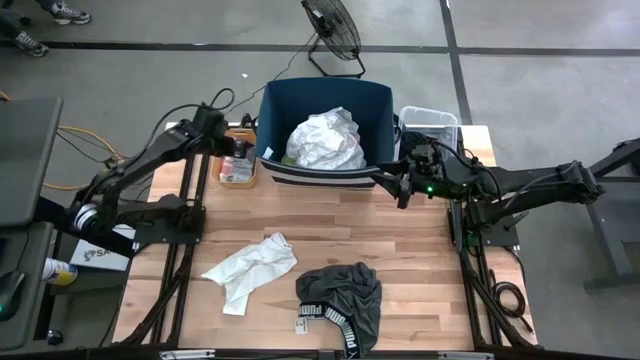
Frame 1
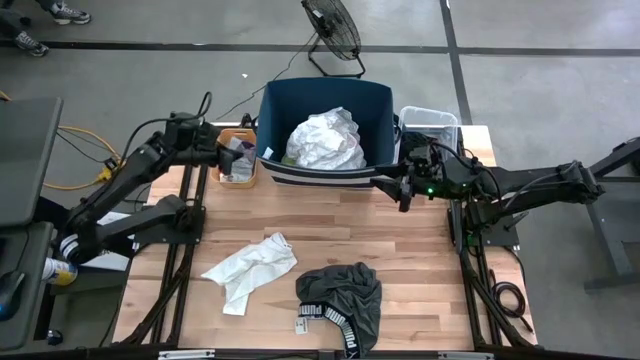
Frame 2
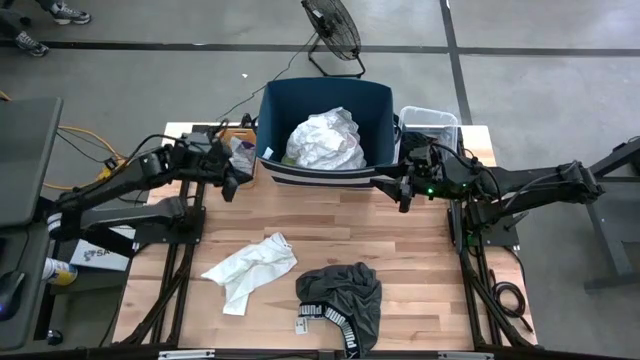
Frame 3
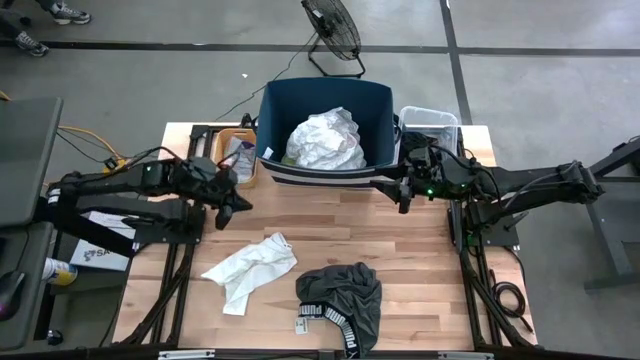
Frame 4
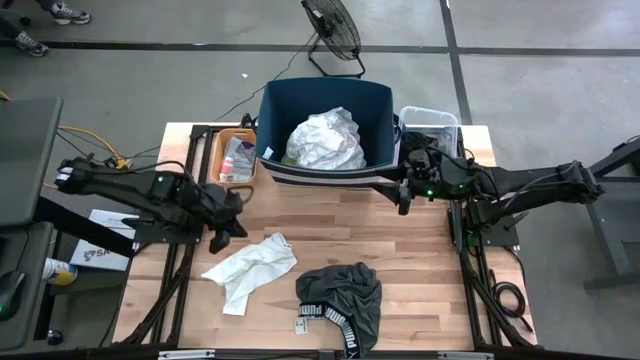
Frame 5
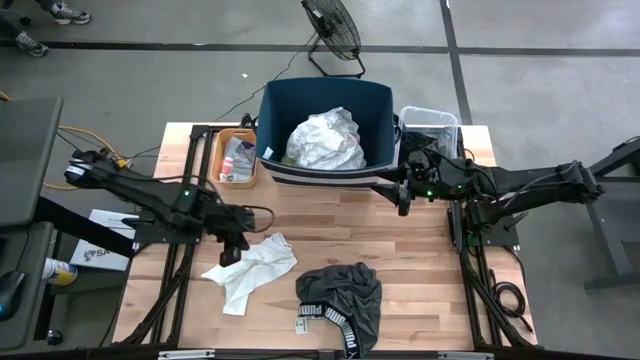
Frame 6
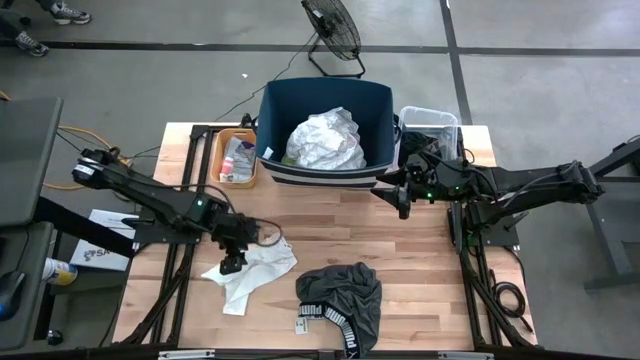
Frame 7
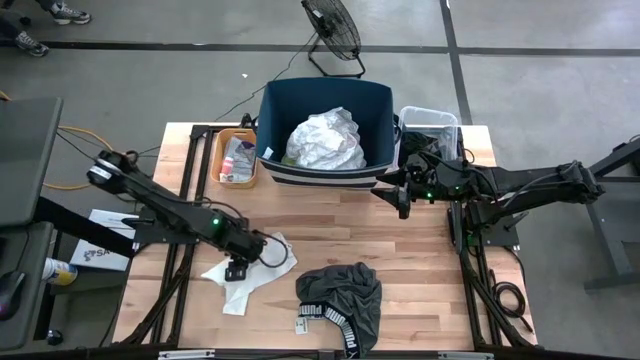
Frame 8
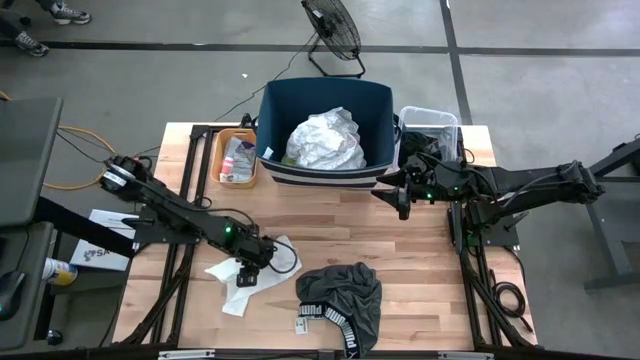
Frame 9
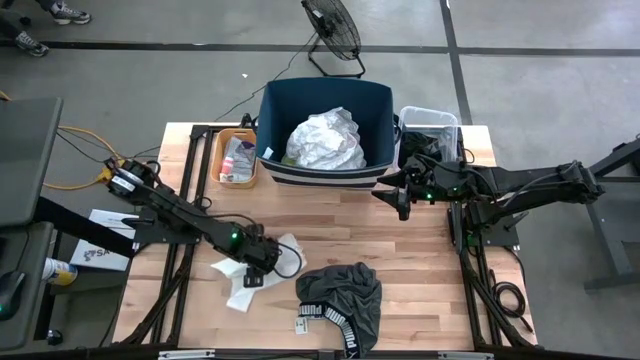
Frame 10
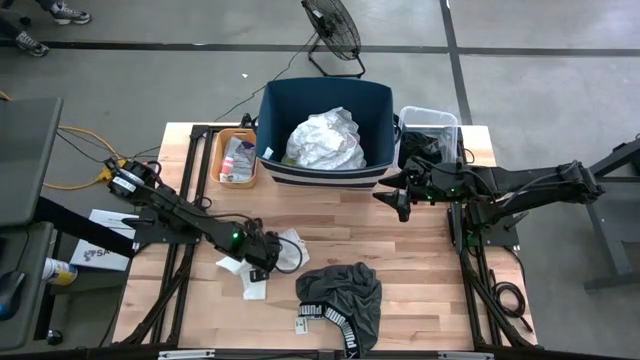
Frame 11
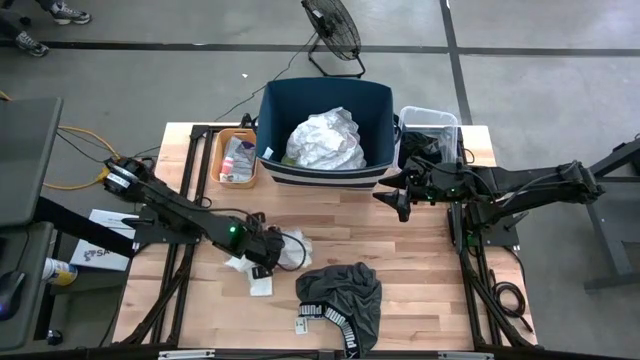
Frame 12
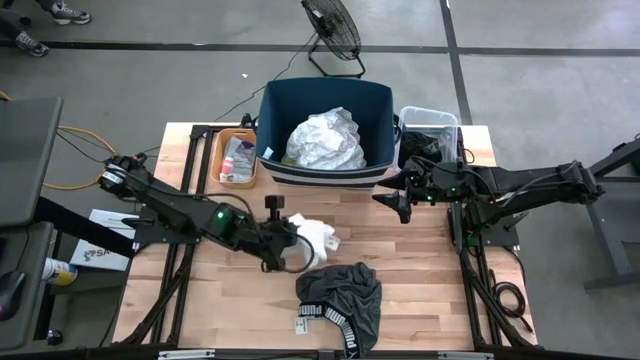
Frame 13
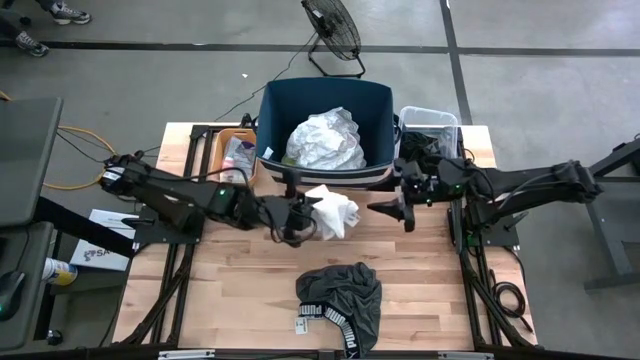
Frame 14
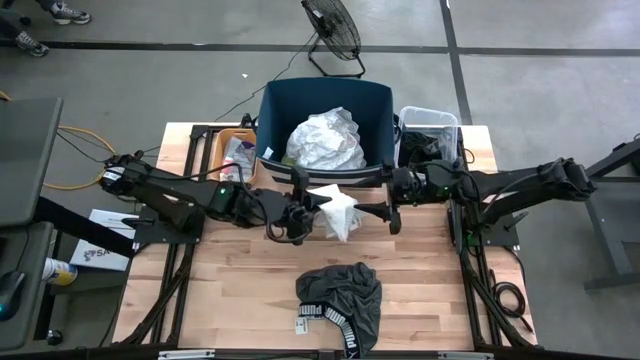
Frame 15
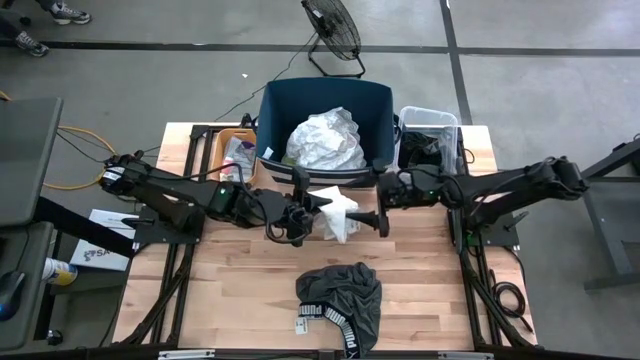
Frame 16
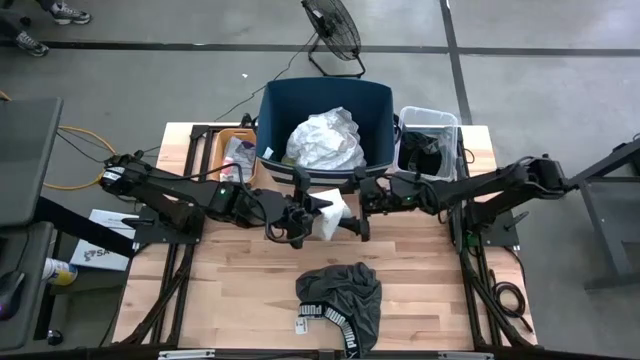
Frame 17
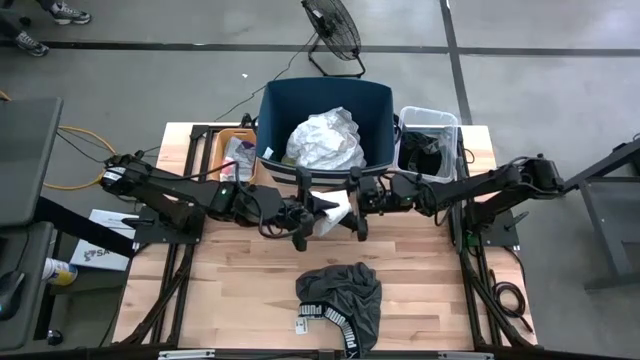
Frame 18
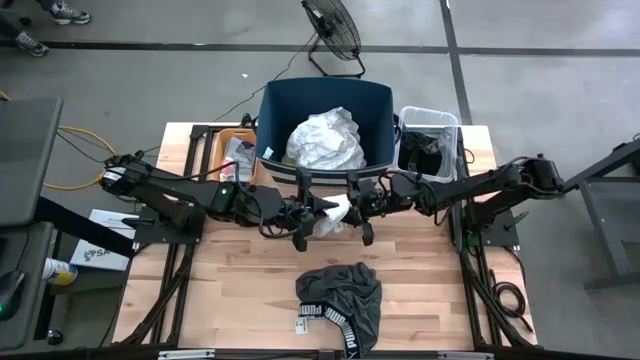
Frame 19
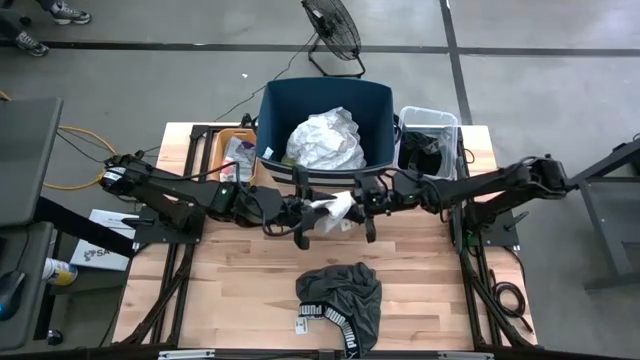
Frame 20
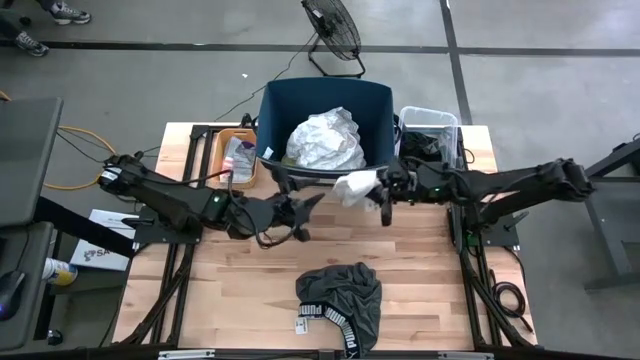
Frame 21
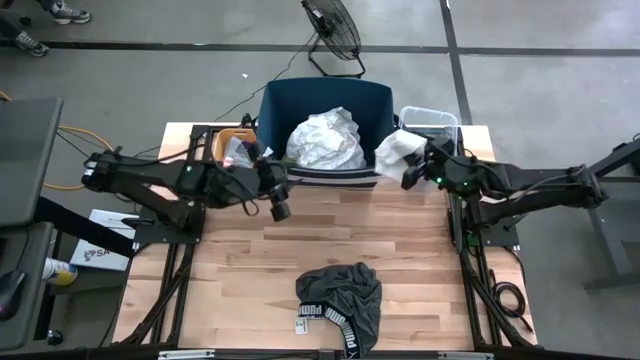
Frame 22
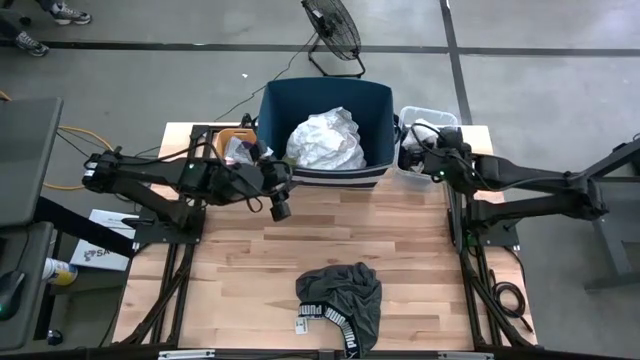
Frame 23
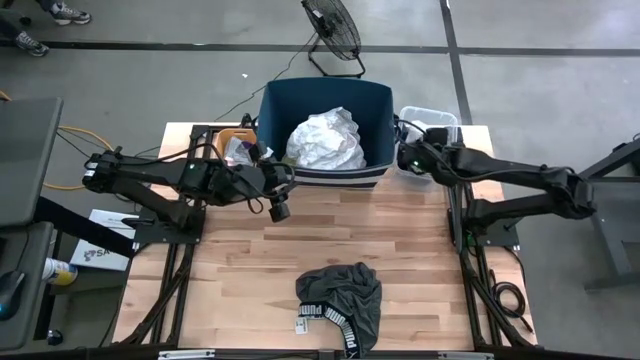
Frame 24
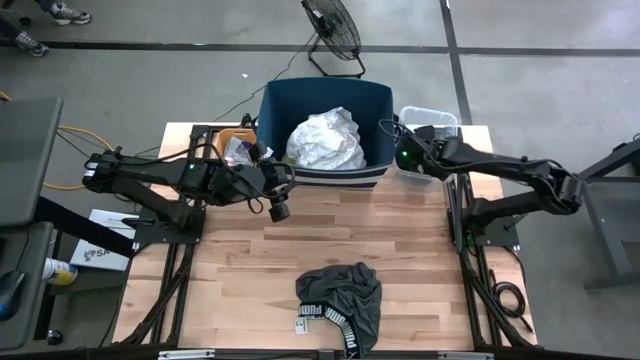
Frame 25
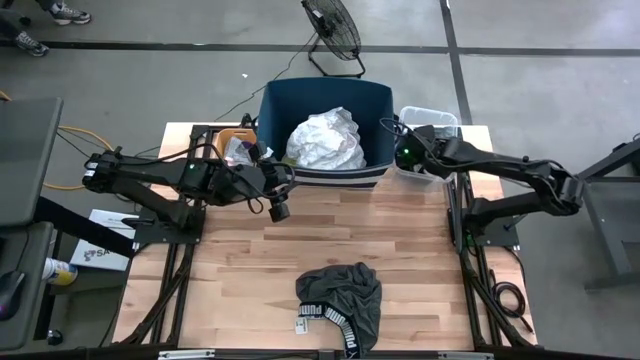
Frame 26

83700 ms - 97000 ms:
Task: Pick & Place Cloths
Put the white underwear into the transparent bin
